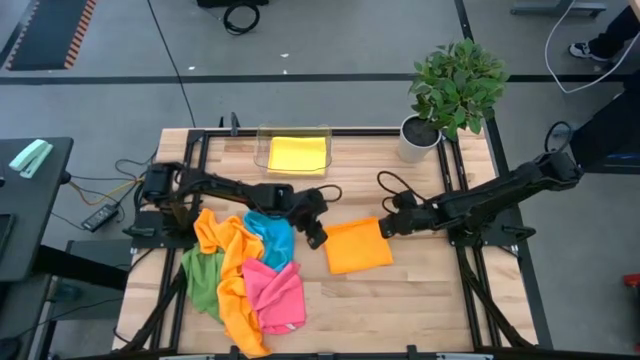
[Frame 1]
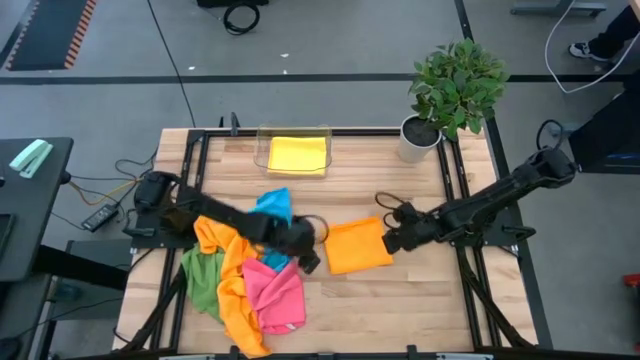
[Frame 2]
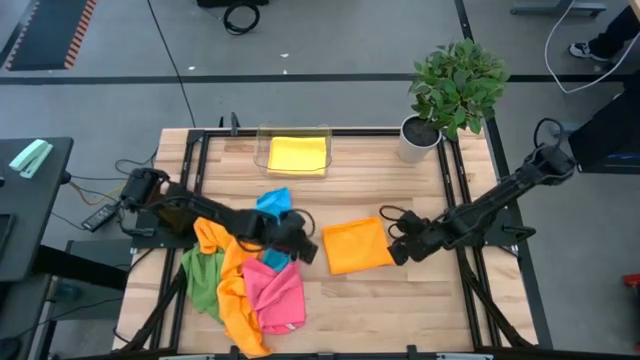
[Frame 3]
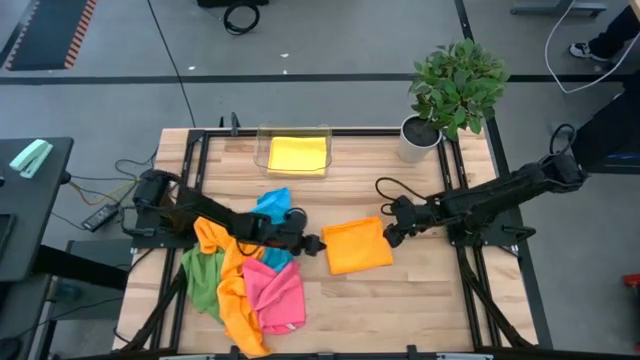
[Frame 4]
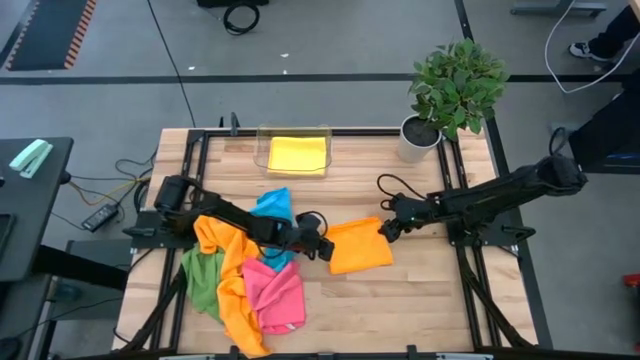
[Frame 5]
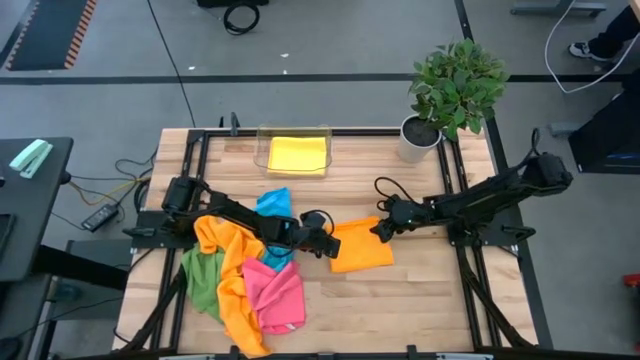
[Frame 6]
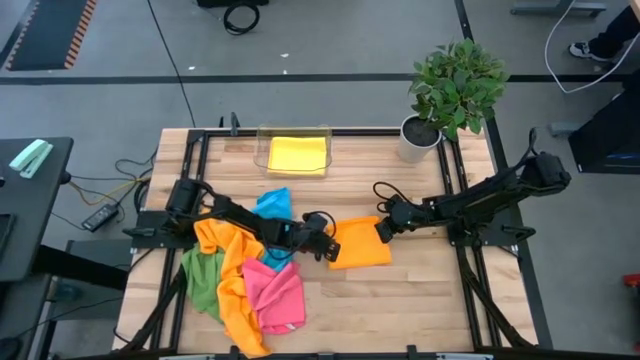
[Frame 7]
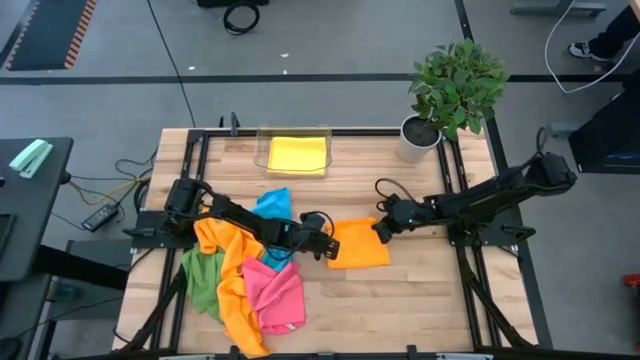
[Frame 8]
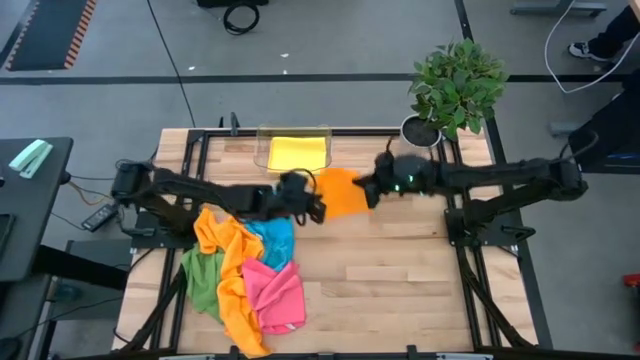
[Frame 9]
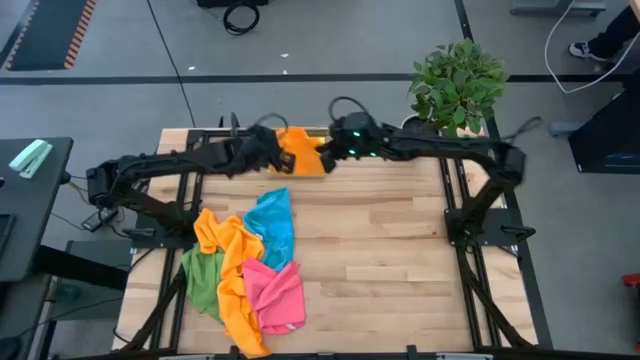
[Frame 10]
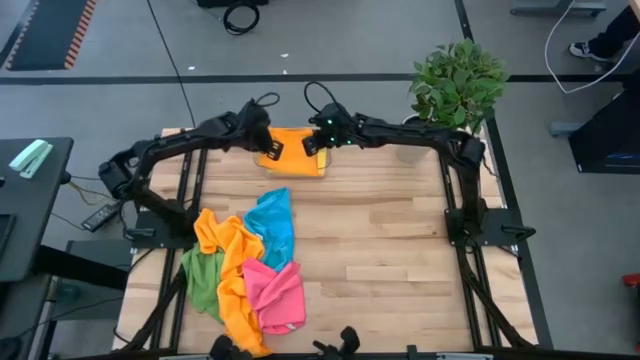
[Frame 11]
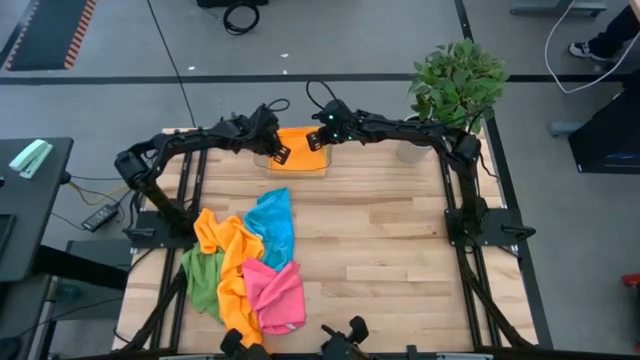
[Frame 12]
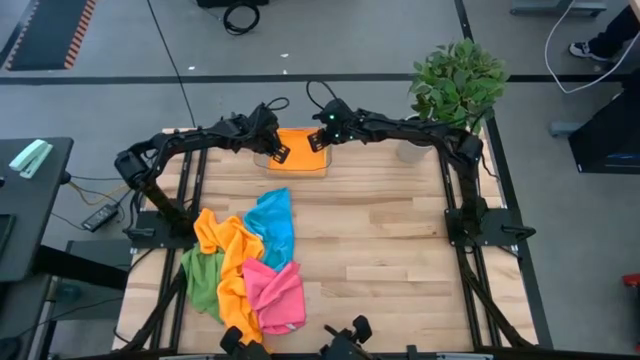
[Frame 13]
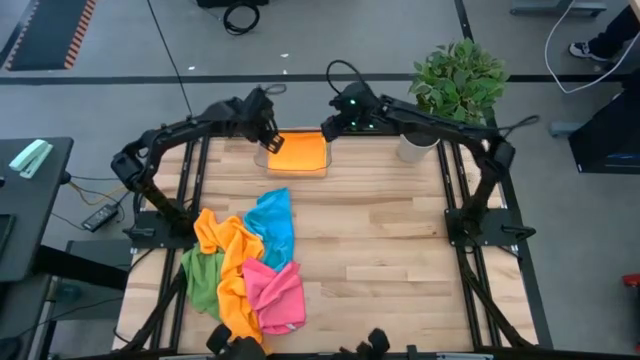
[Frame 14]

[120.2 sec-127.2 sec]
Task: Fold microfiber towels
Put the orange microfiber towel into the transparent bin

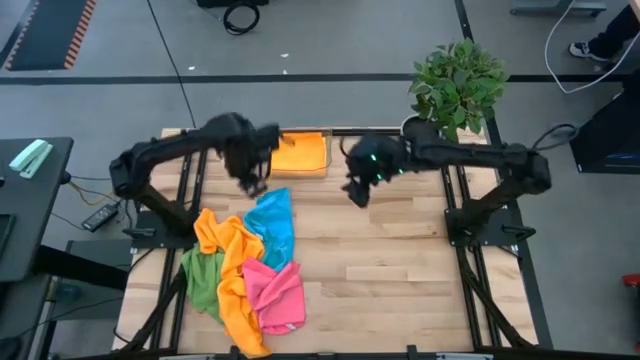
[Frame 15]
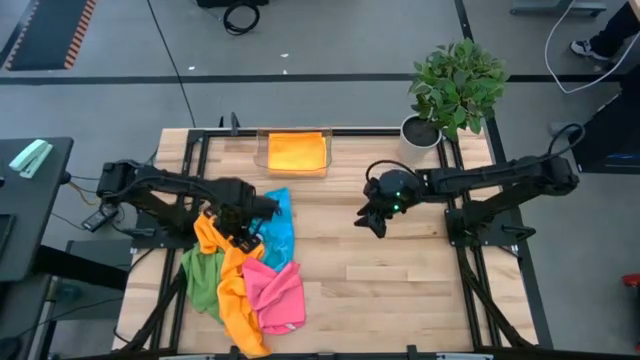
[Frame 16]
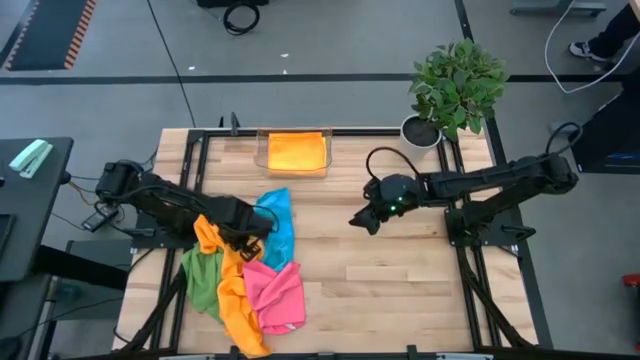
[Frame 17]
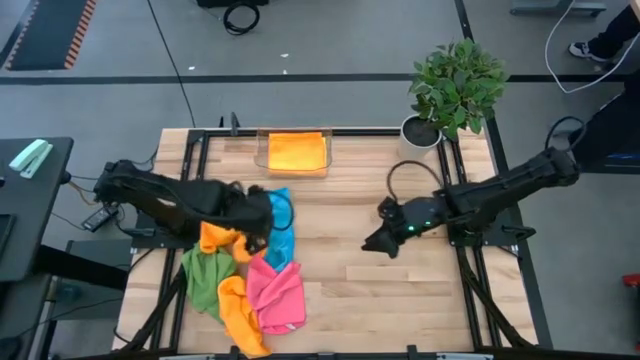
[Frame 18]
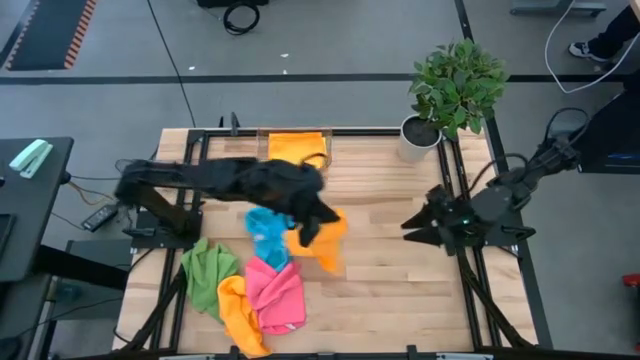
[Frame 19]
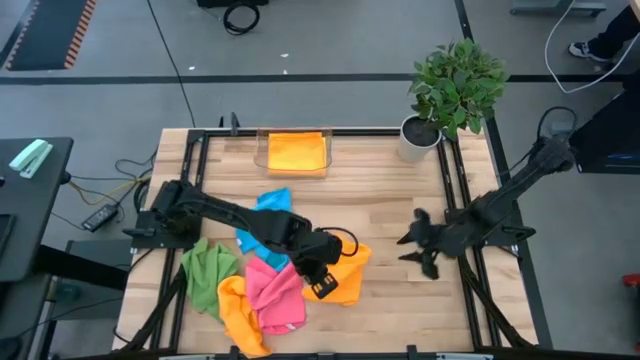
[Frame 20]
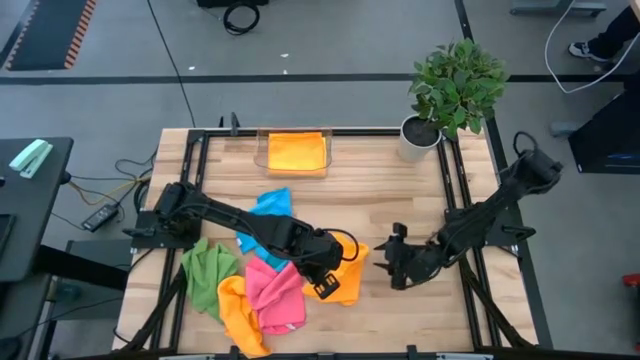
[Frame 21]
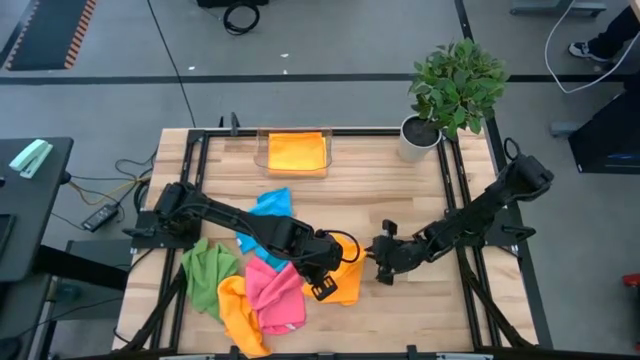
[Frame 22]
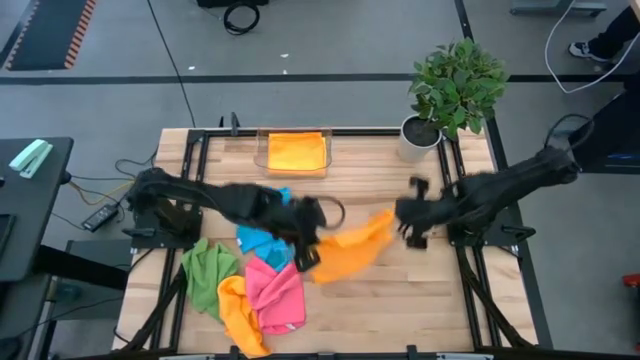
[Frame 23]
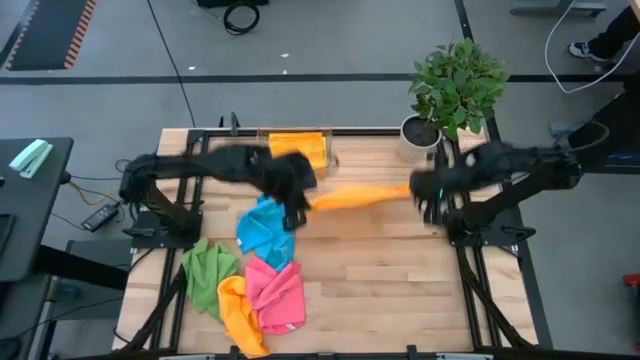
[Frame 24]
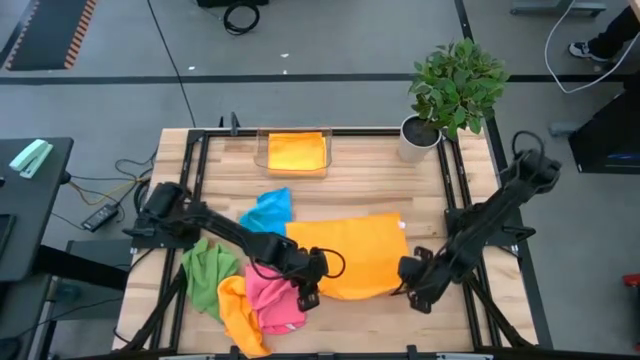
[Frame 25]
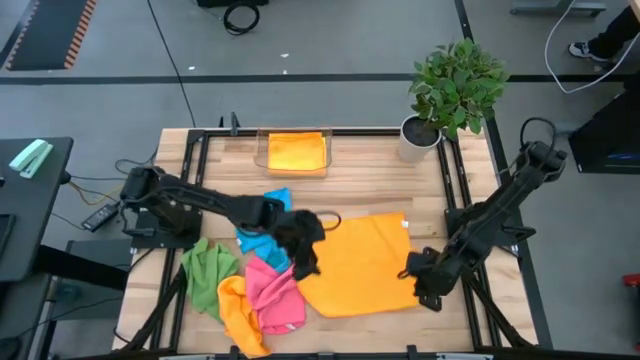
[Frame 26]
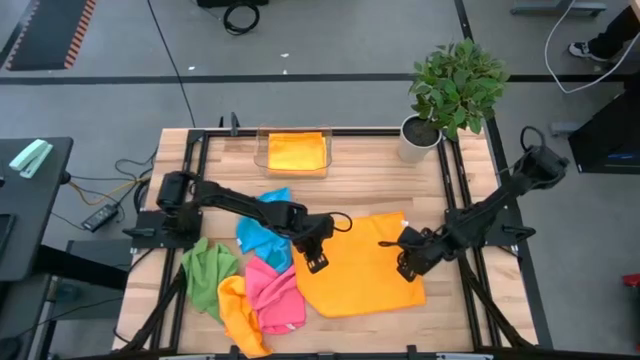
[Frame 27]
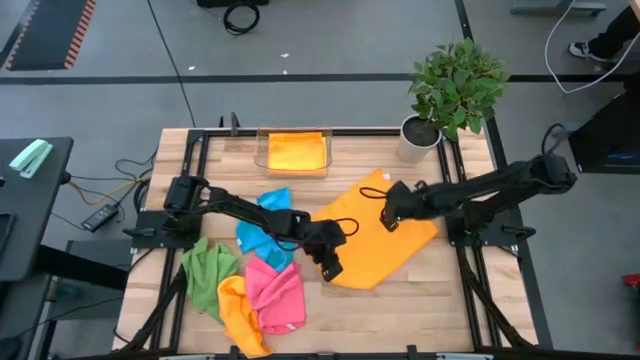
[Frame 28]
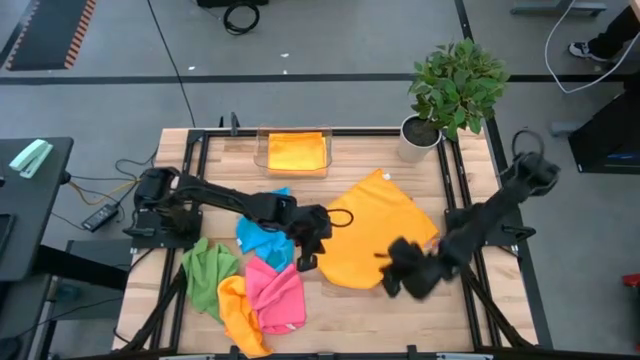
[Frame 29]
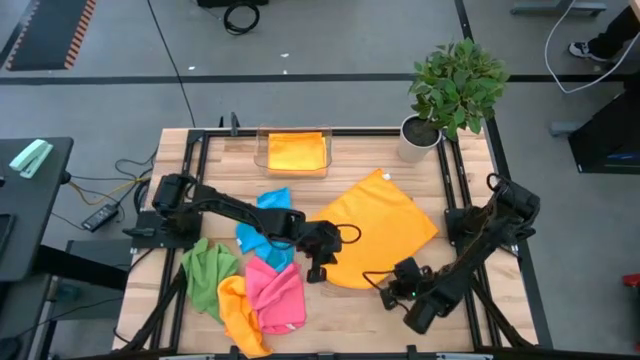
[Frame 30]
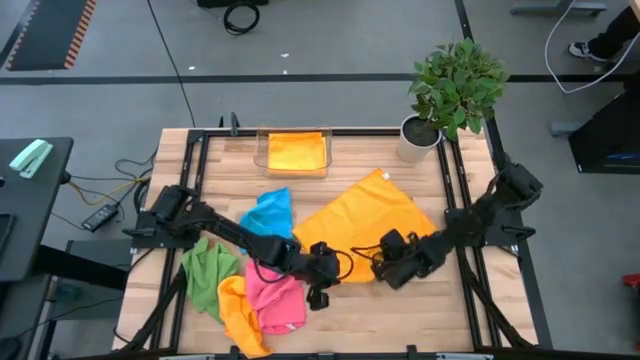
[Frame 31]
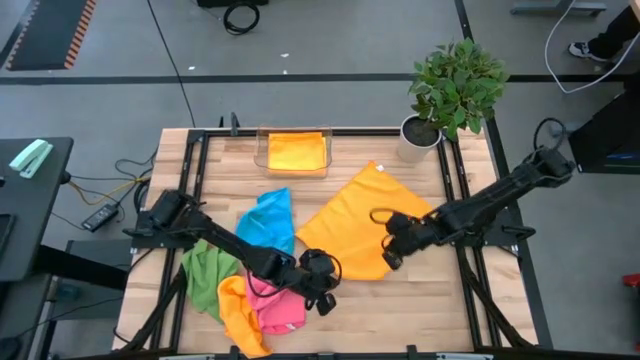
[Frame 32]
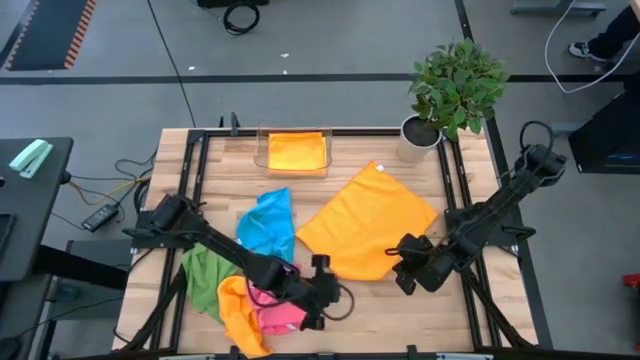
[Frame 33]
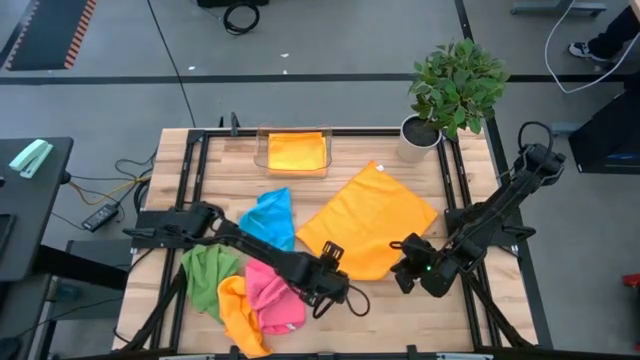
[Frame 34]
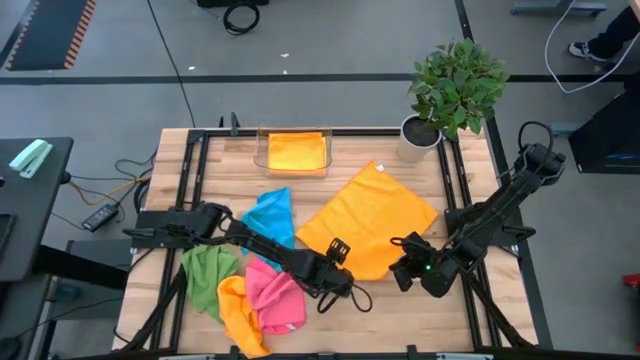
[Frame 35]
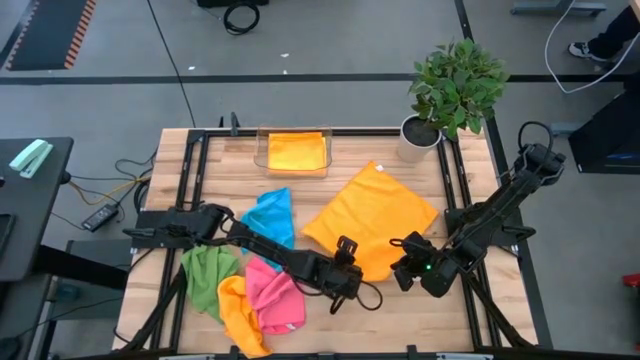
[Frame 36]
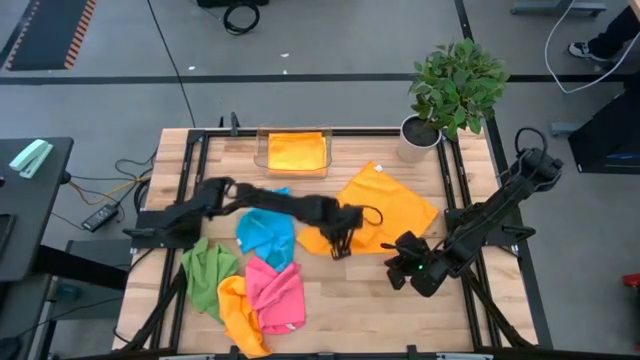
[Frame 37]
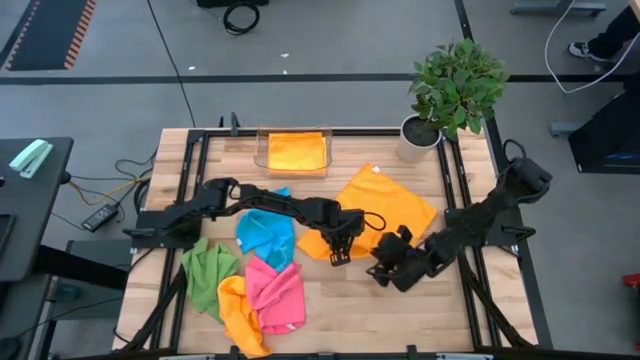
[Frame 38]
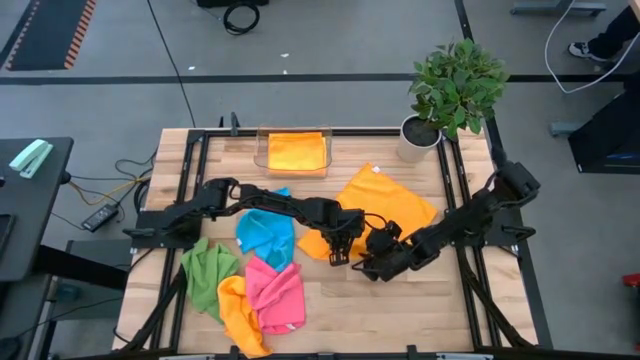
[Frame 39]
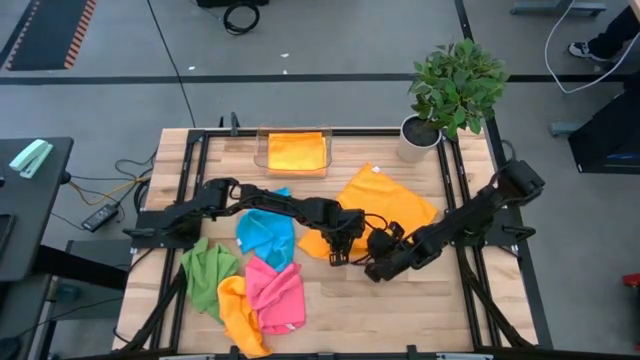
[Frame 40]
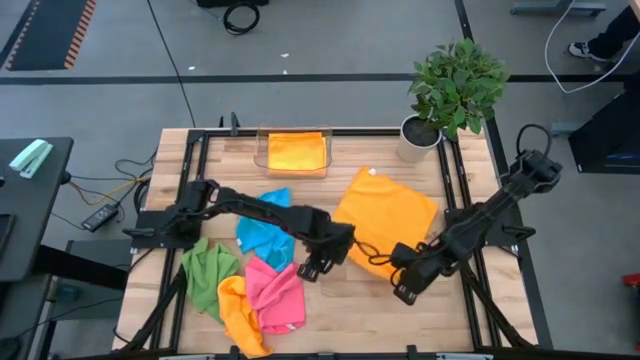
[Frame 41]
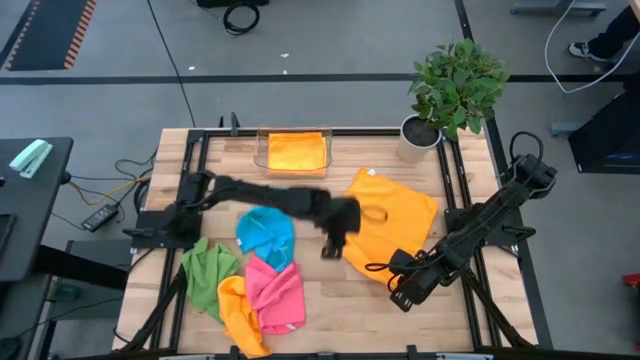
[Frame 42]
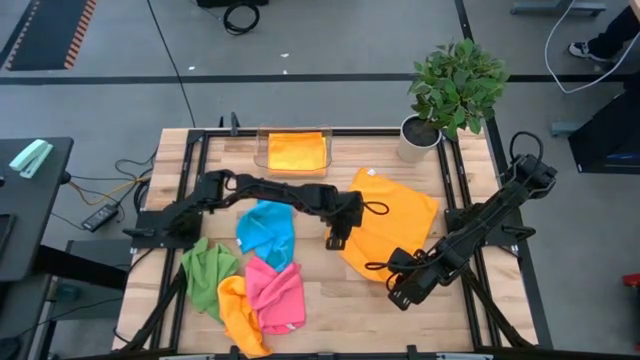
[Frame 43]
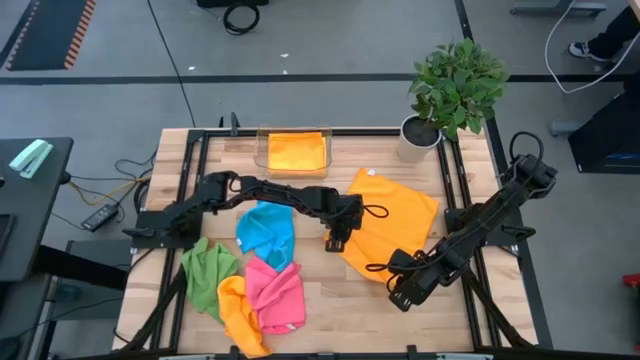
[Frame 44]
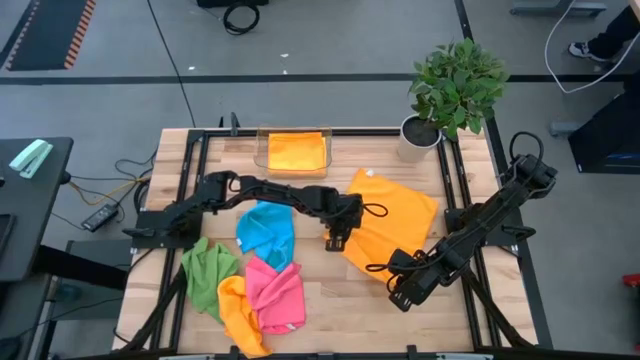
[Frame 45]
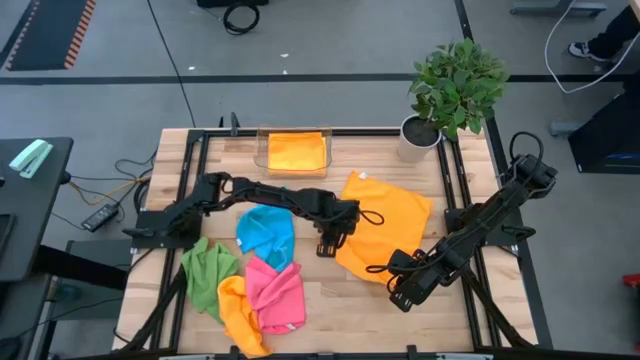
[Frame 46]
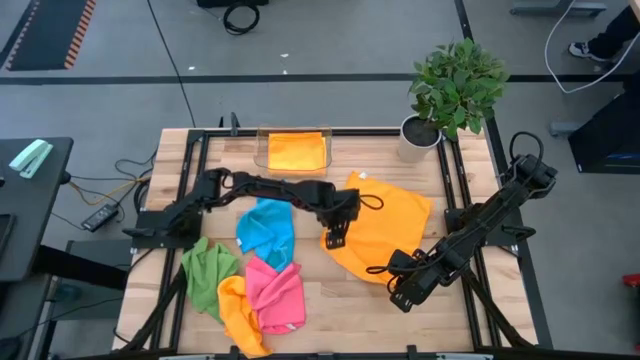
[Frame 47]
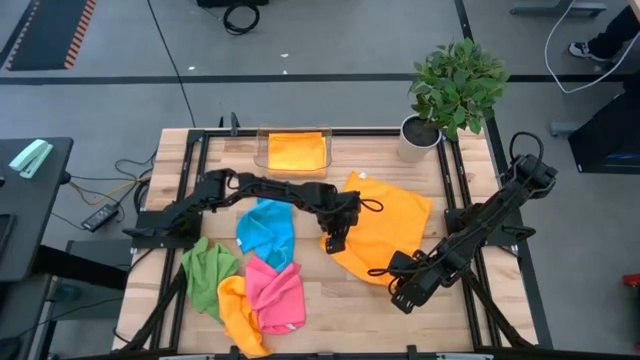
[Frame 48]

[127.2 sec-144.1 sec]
Fold the orange microfiber towel
